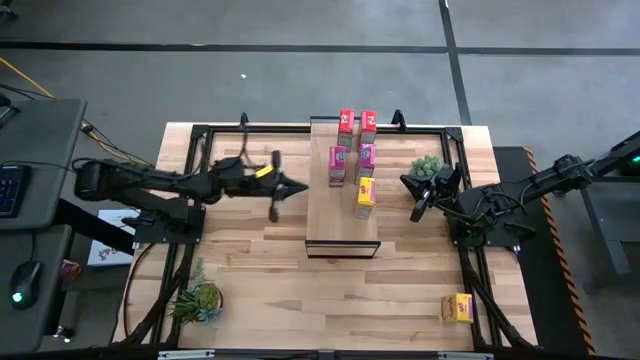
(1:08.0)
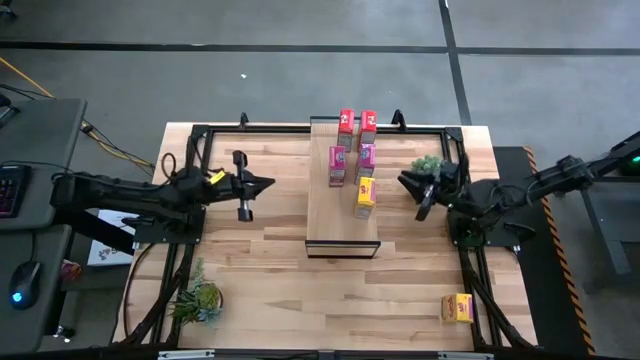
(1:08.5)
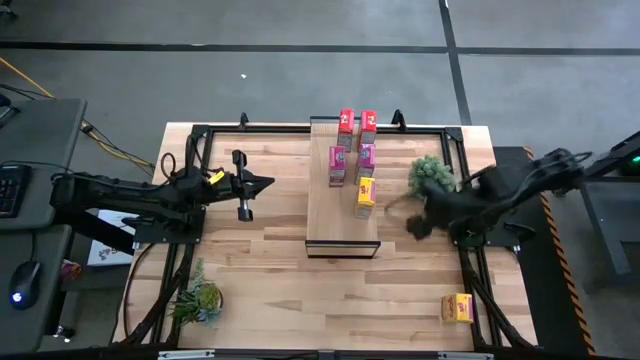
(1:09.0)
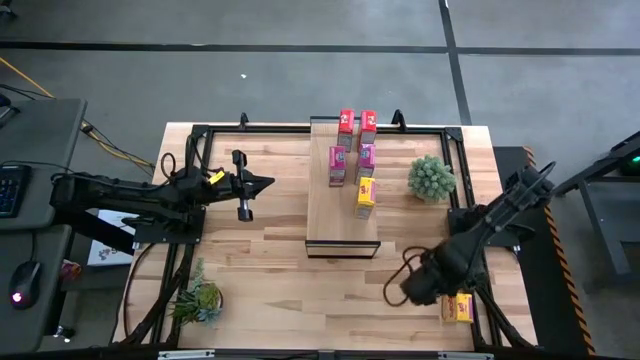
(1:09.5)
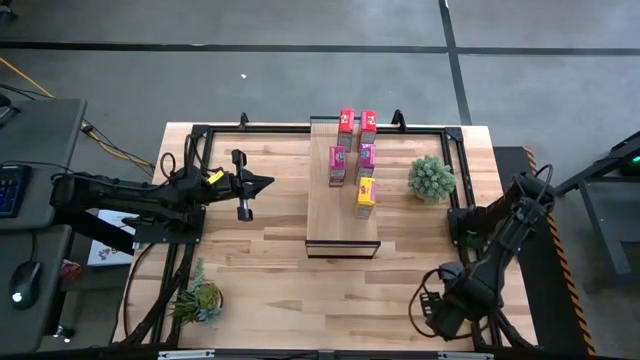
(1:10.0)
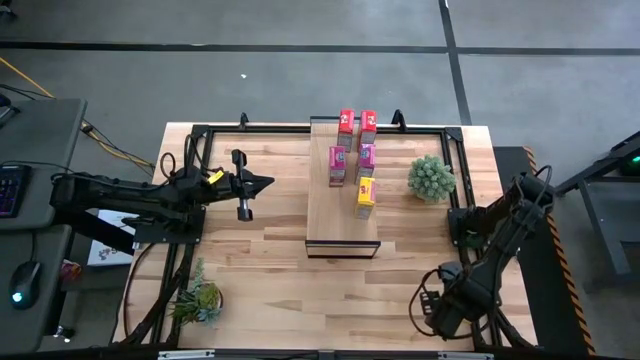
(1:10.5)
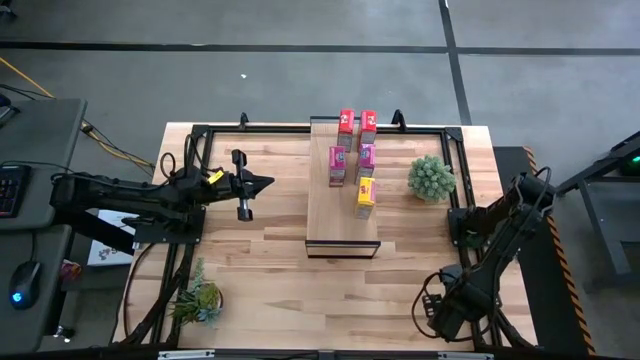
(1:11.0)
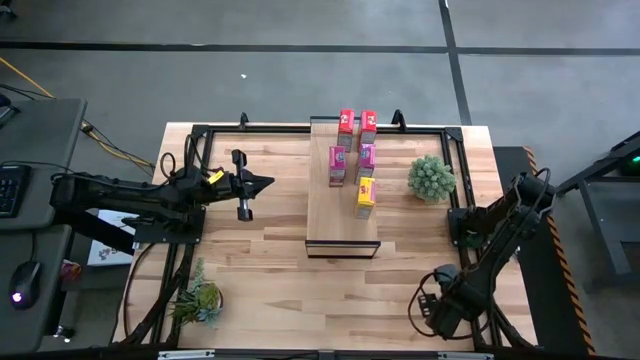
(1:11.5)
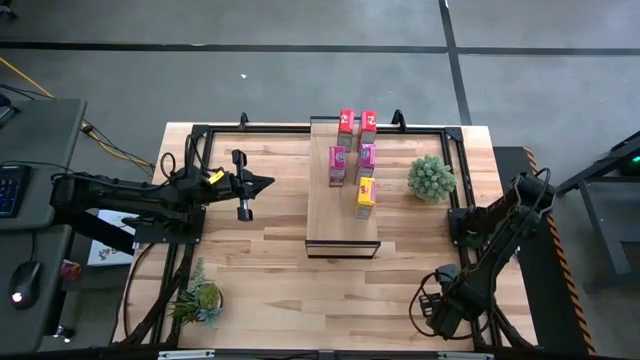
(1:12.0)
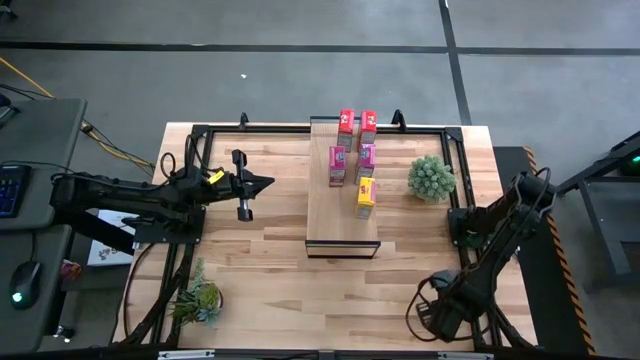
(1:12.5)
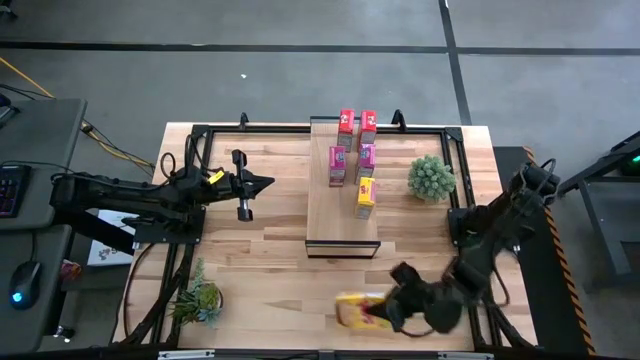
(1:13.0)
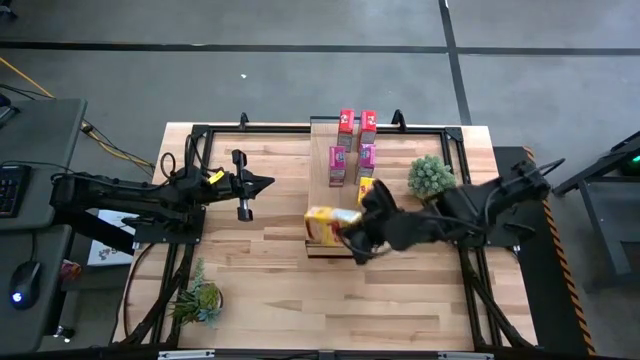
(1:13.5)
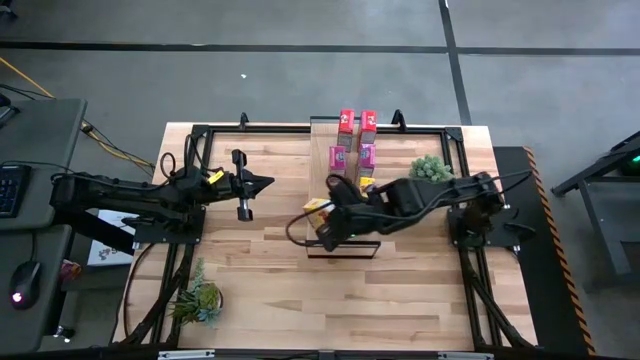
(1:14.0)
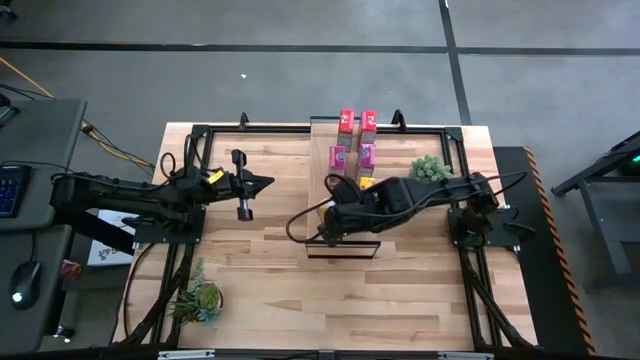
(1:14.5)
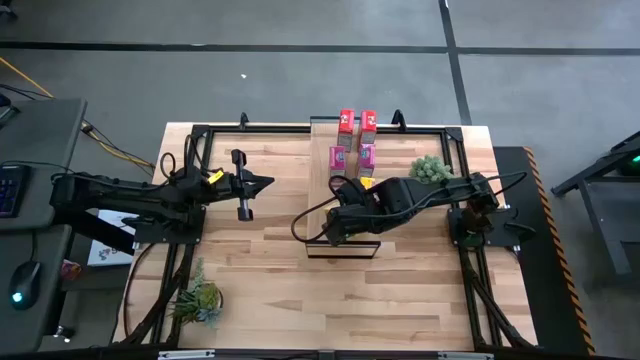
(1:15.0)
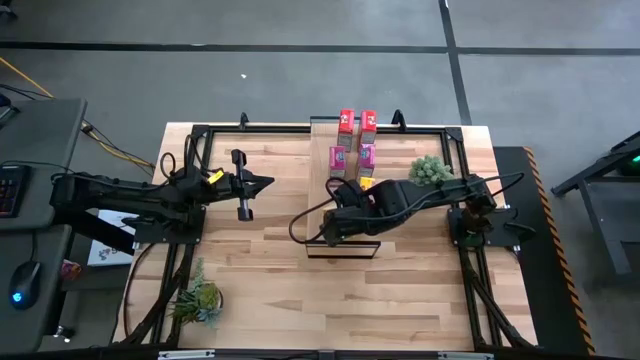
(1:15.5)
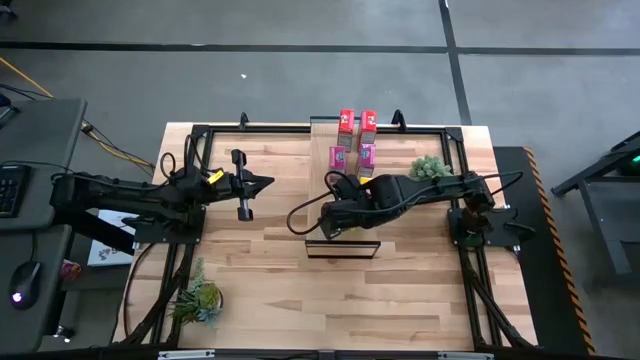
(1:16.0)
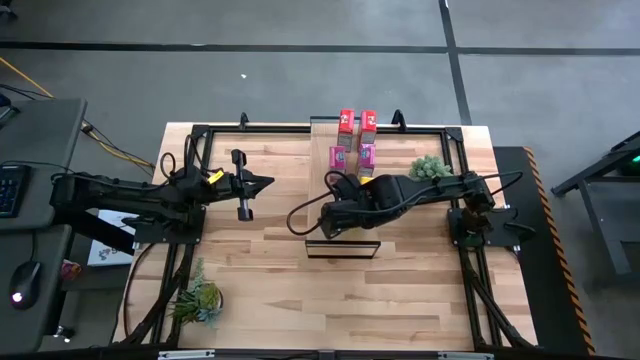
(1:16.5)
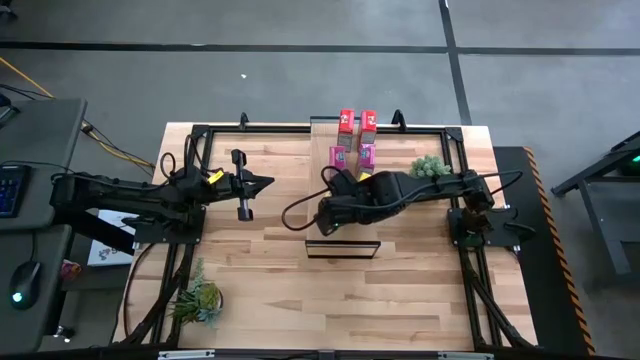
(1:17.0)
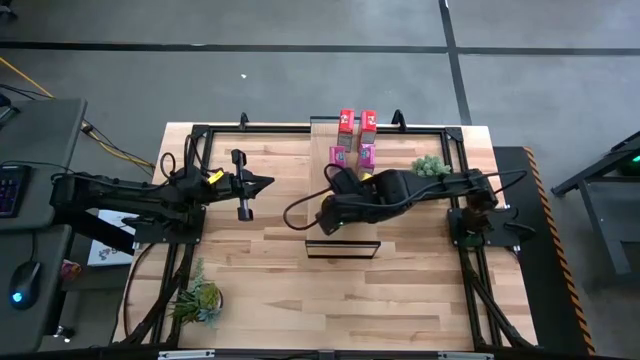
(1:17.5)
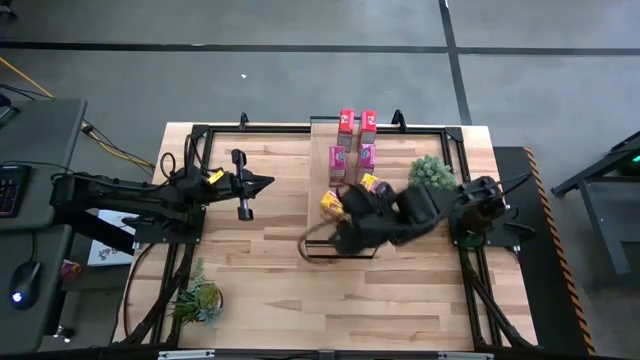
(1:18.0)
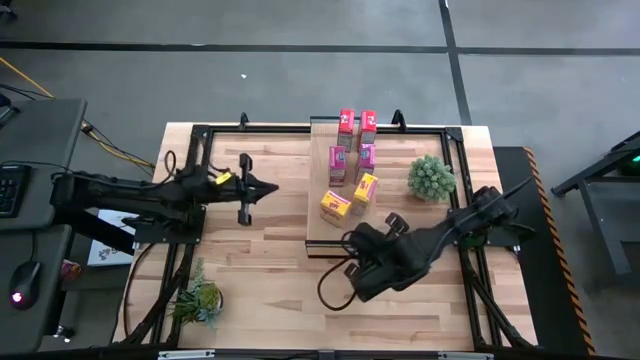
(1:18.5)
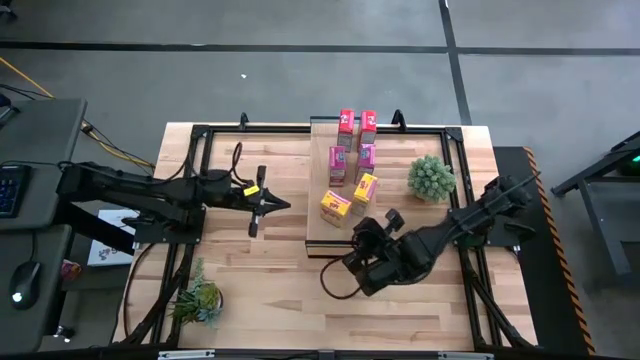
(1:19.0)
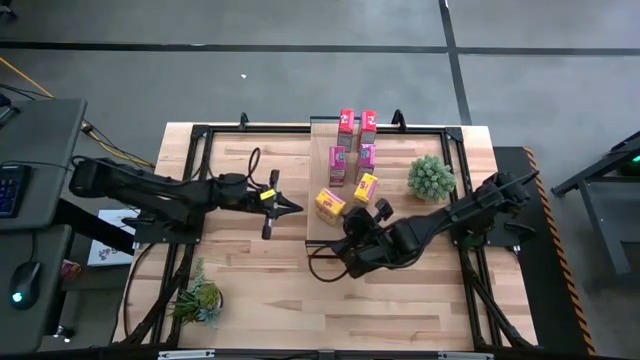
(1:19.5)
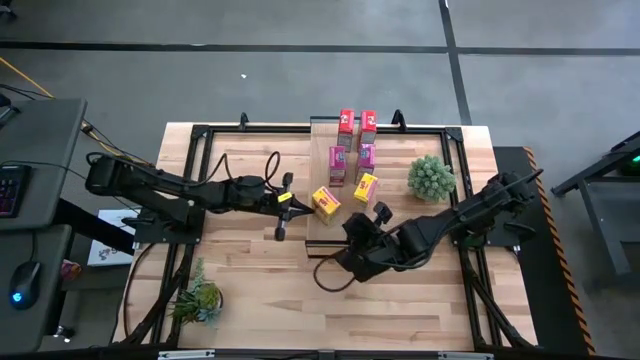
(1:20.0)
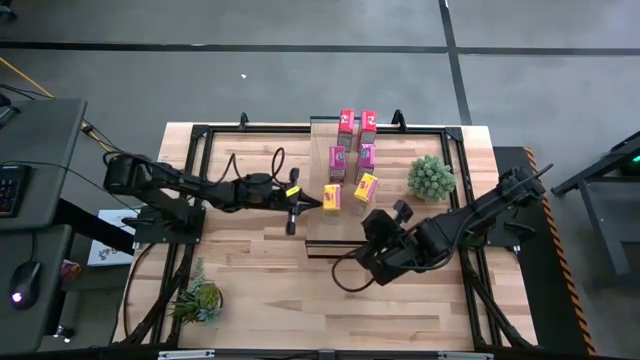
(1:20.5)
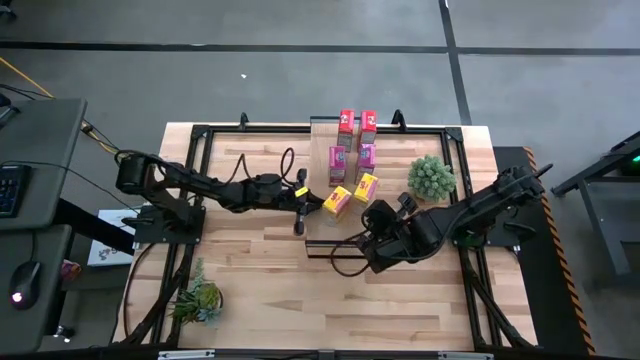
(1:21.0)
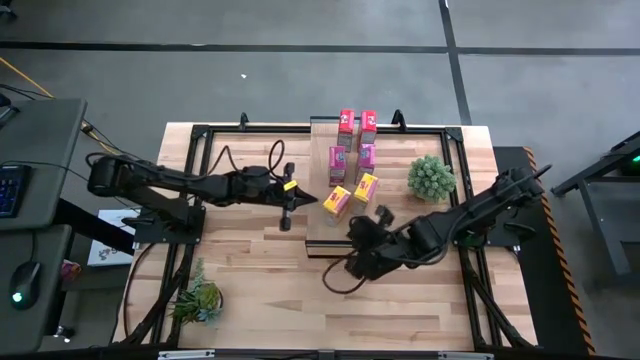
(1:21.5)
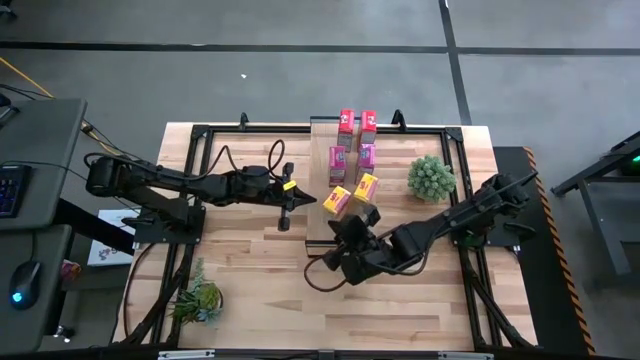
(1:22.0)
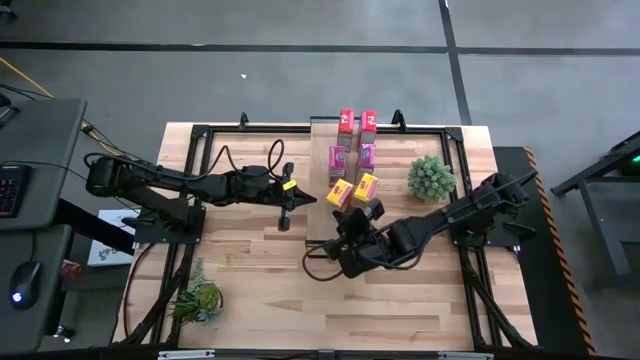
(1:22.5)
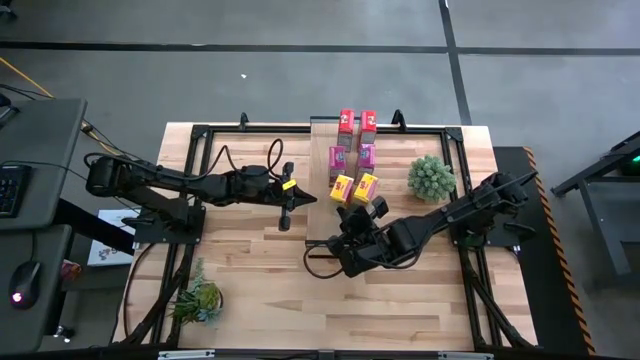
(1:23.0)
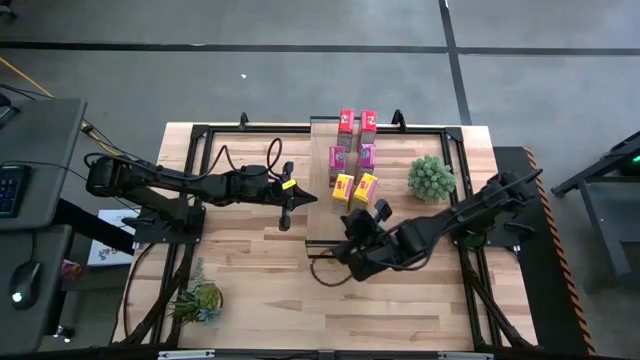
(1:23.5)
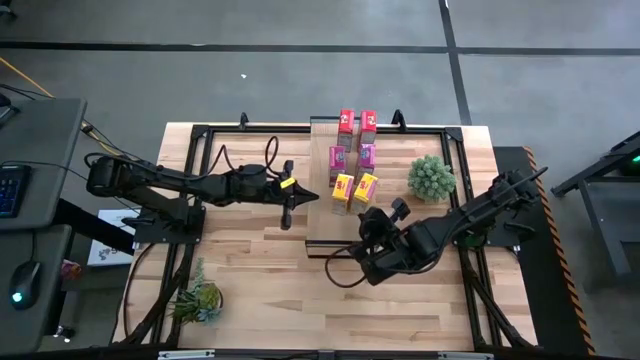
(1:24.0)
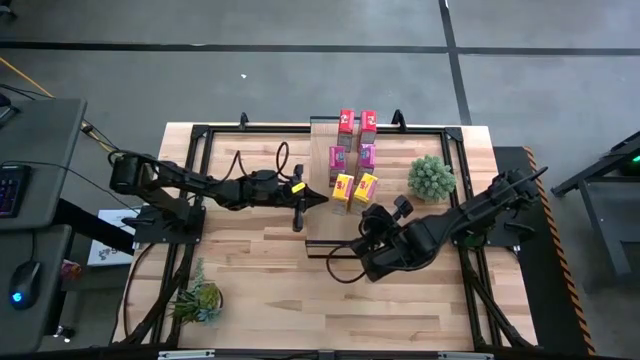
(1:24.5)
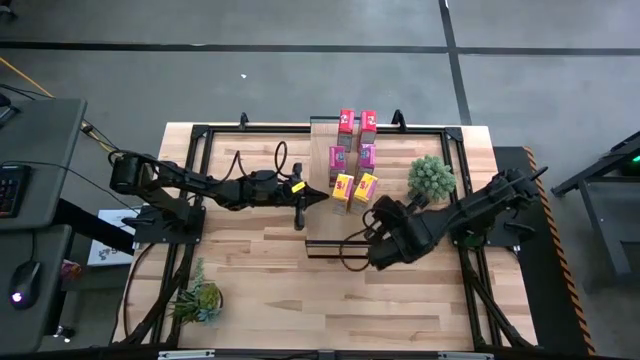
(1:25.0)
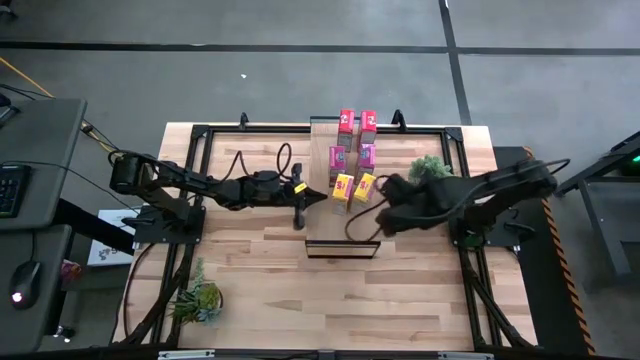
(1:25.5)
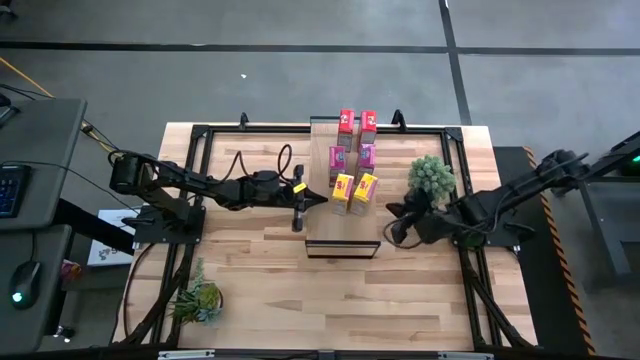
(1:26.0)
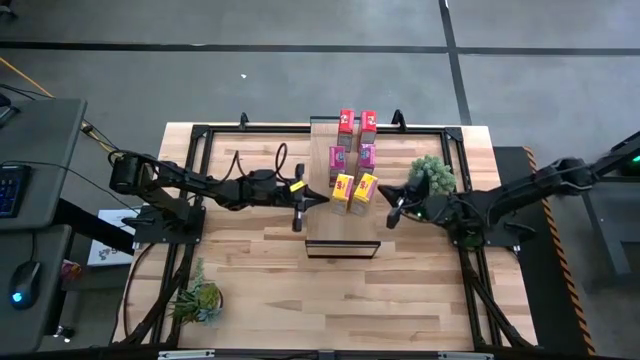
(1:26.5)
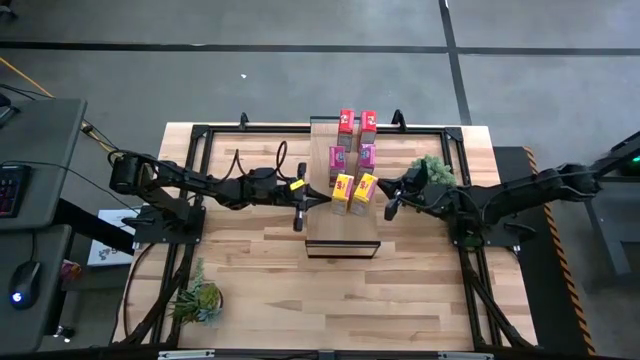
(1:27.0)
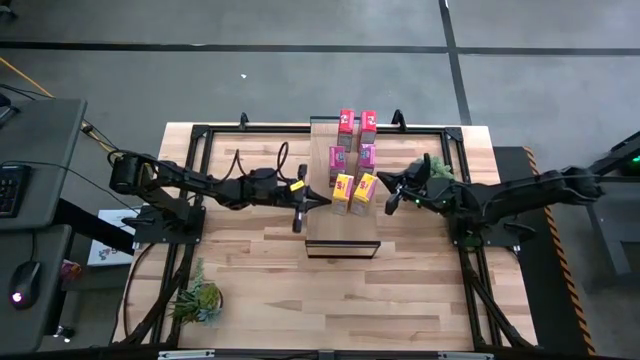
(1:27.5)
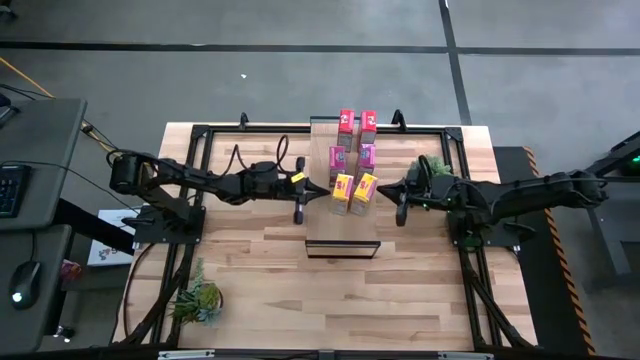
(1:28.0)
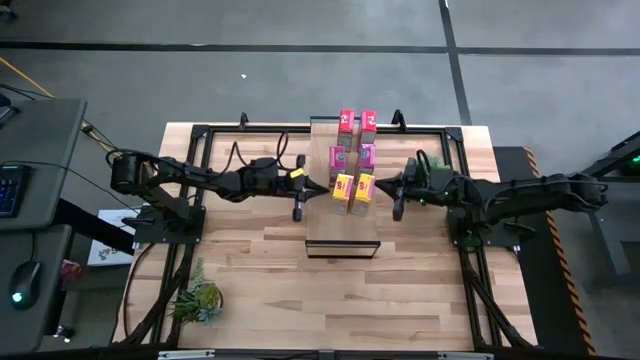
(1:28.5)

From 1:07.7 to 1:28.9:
Task: Stack cereal on shelf
Put the yellow cereal box on the shelf aligned with the yellow cereal box

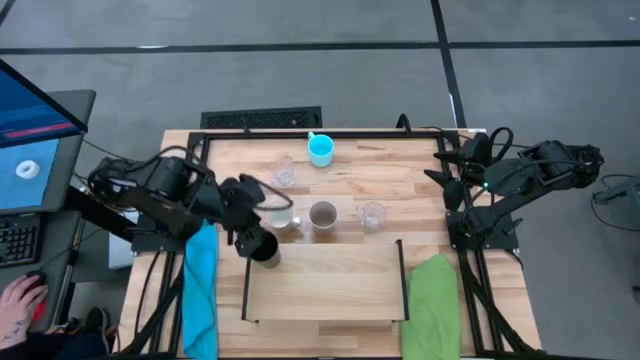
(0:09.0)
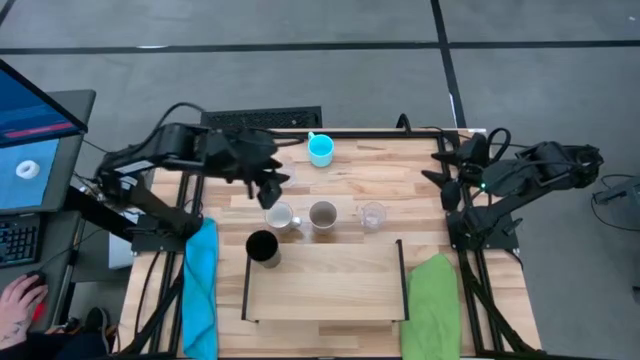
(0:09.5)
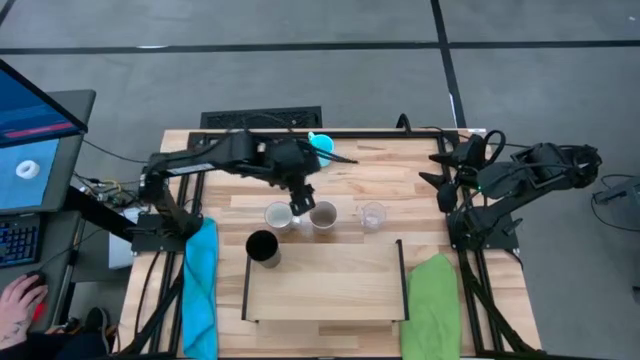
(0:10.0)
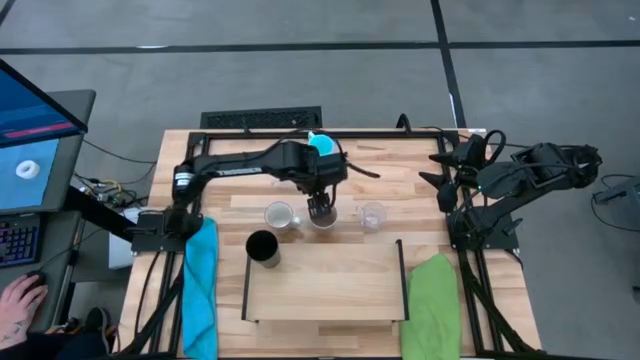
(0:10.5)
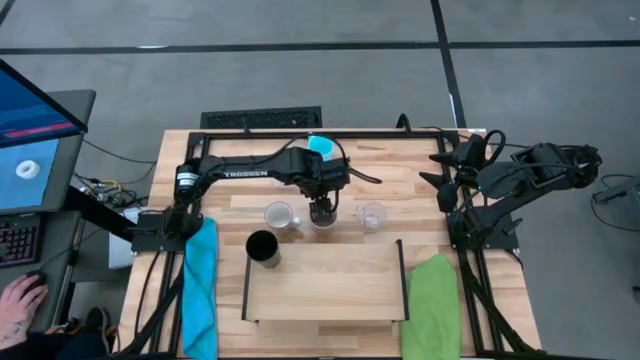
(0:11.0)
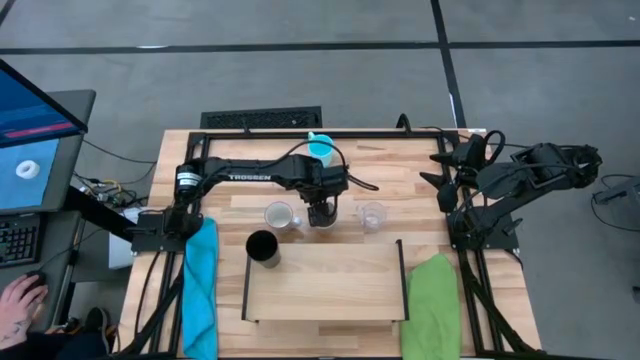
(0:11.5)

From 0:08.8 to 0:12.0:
Task: Stack small to large cups/mugs on shelf
Put the white cup on the shelf
